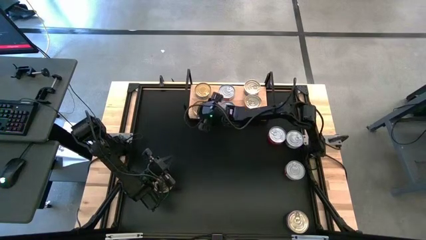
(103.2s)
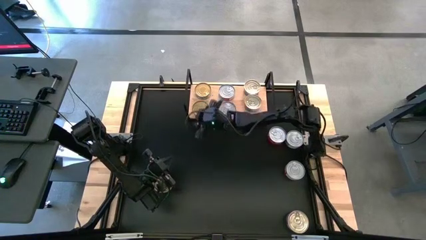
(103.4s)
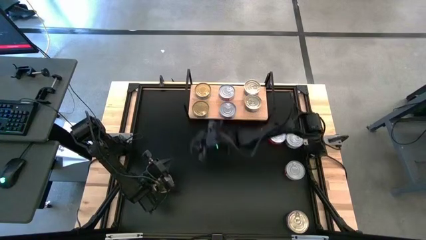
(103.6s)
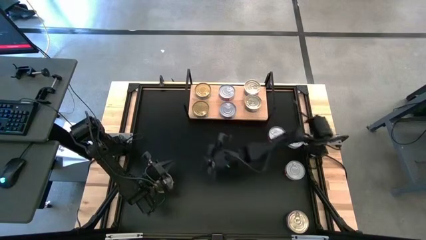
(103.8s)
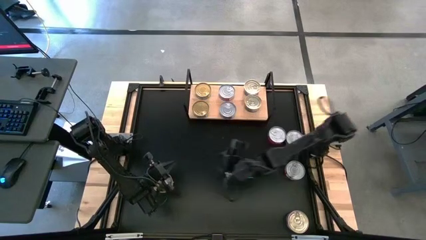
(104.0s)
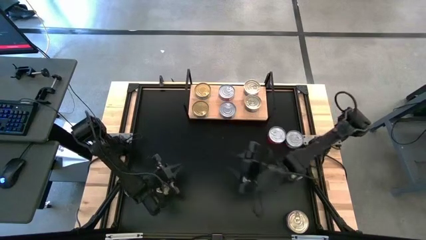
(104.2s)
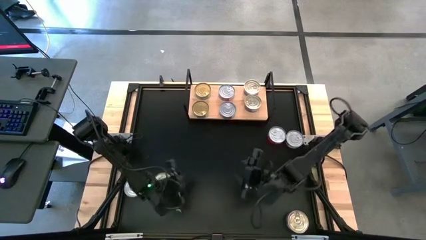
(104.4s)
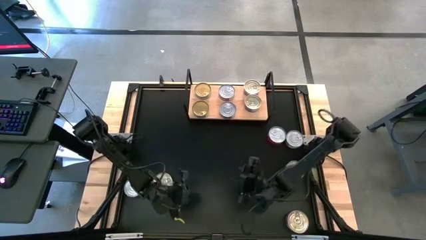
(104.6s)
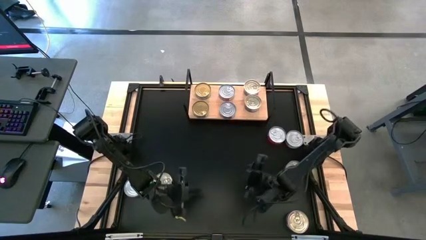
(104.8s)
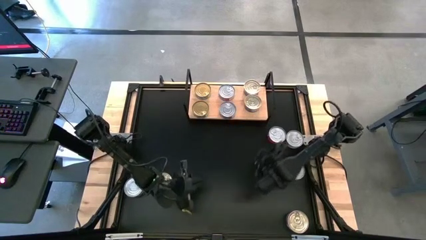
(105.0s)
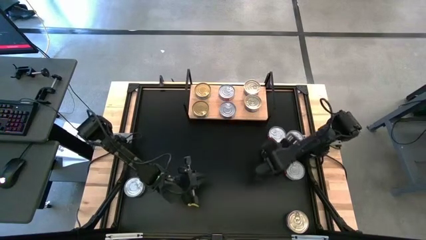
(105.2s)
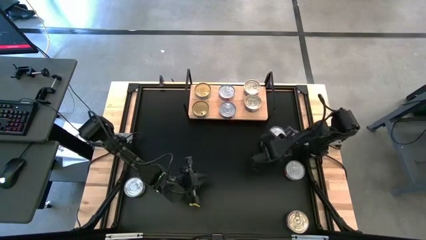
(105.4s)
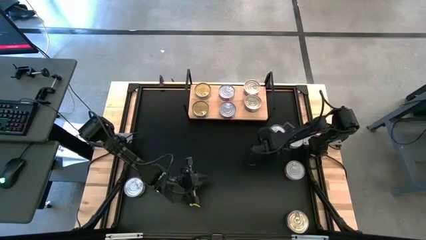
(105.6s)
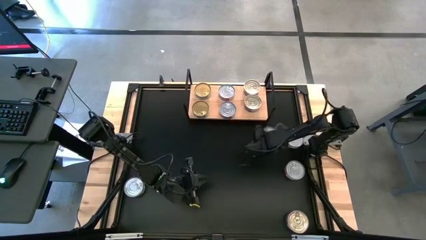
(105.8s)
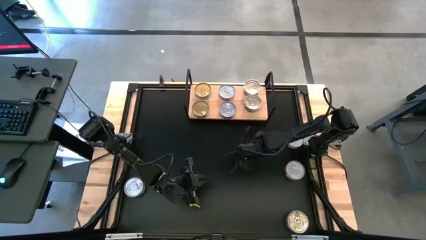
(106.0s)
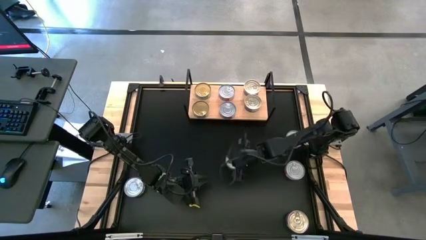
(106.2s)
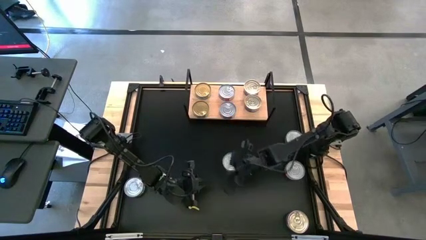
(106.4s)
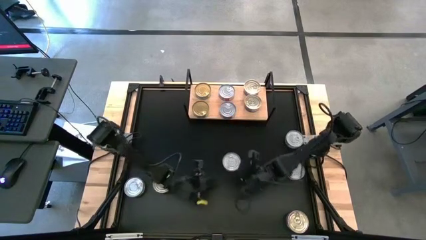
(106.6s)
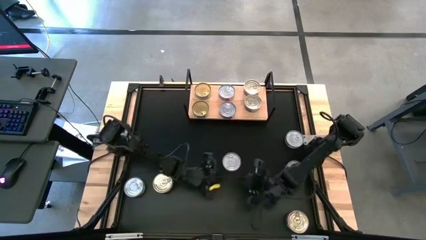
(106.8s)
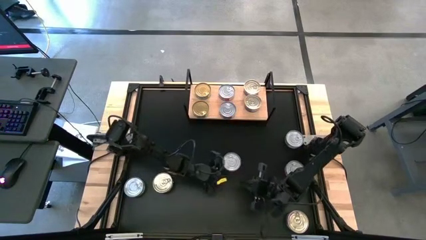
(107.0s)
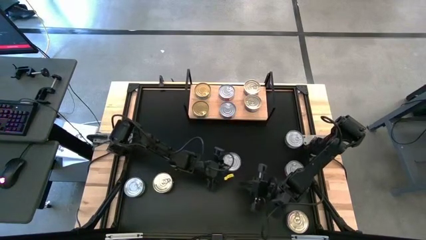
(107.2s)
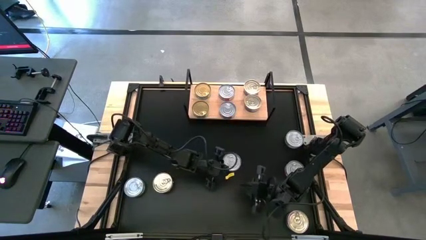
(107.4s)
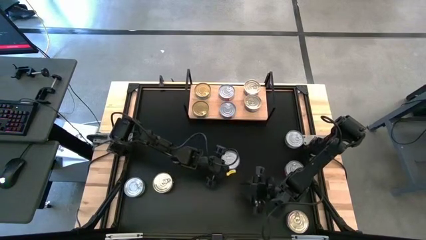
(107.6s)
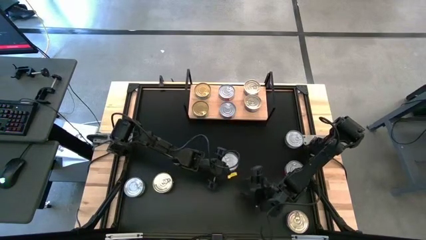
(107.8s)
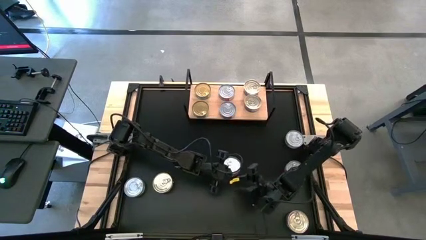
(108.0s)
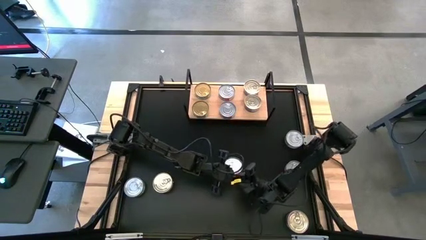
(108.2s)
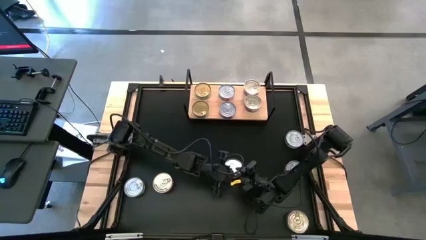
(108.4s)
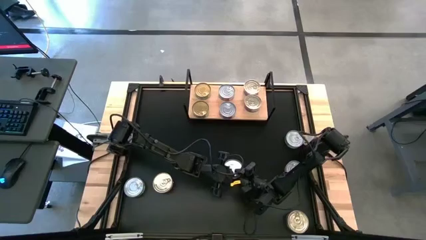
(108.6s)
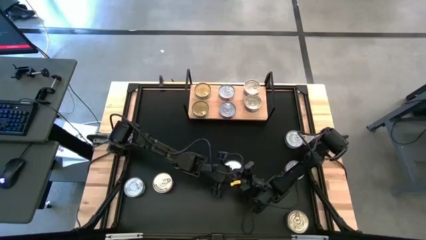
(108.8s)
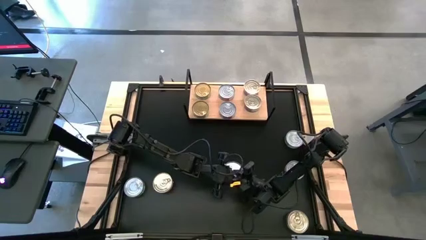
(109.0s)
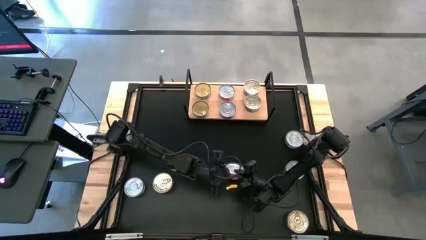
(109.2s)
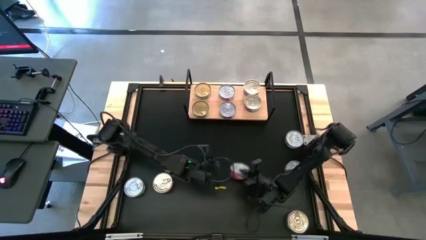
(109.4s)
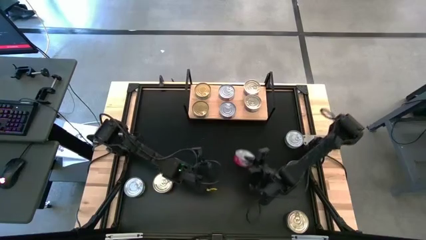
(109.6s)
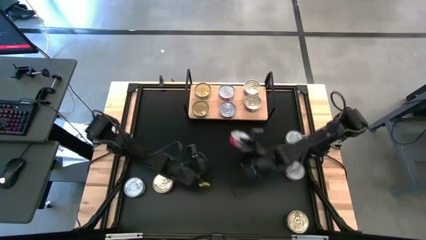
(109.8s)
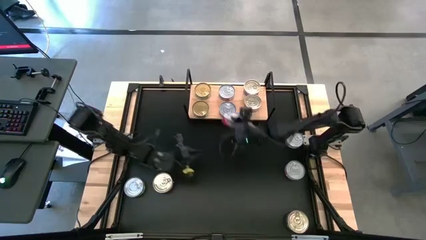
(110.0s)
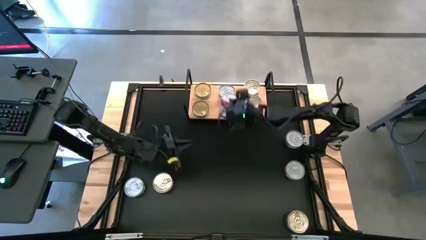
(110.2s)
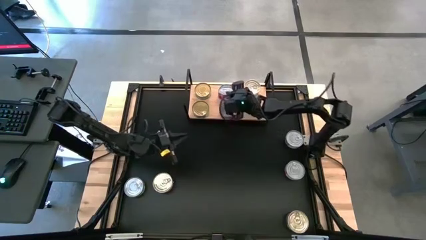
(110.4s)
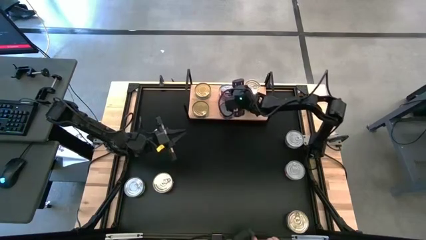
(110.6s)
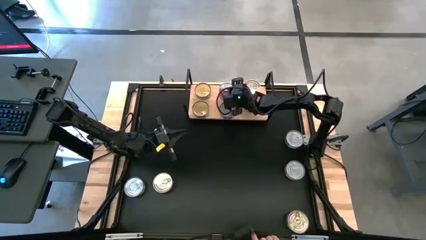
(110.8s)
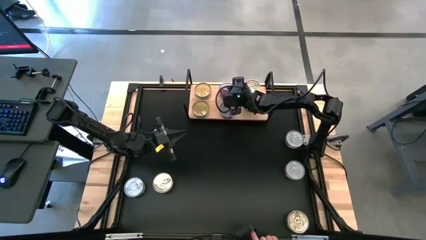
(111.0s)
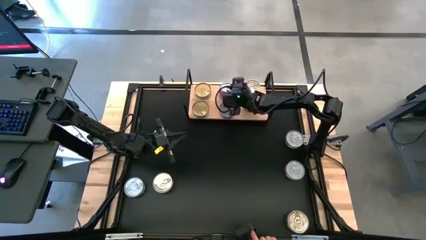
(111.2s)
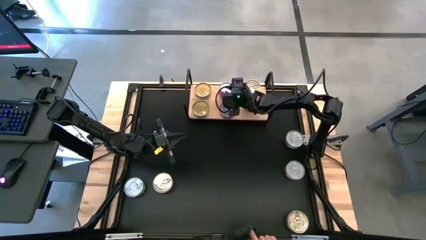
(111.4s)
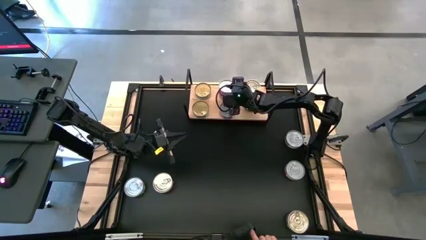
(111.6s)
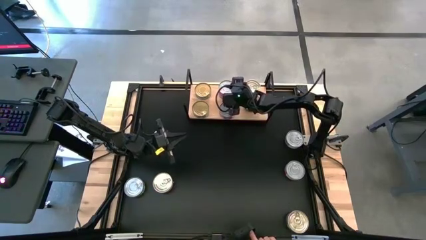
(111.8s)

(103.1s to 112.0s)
Task: Stack canned seafood by type on shelf
Stack the red tuna can on top of the red tuna can on the shelf
